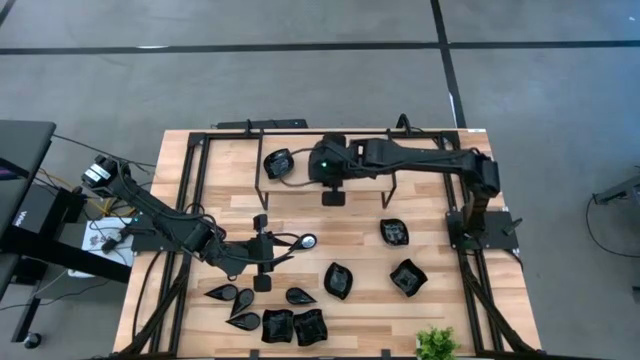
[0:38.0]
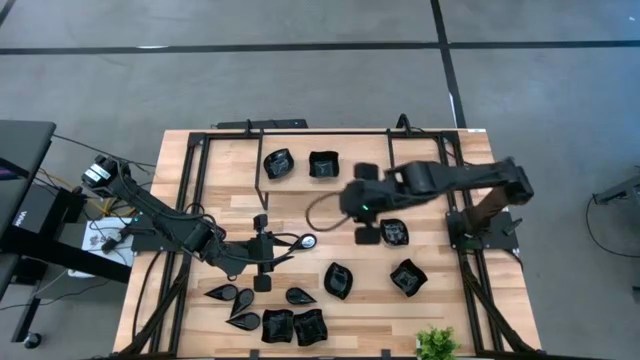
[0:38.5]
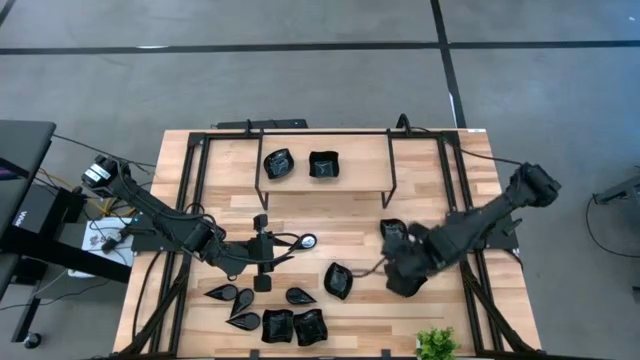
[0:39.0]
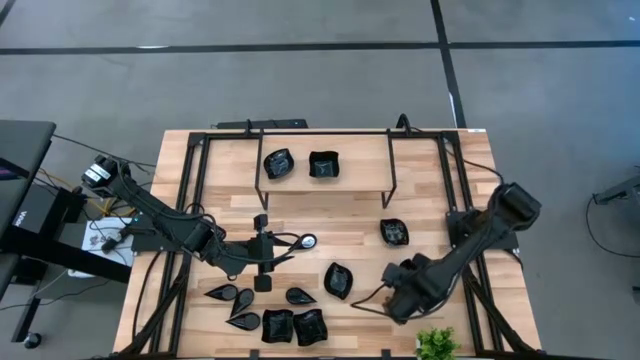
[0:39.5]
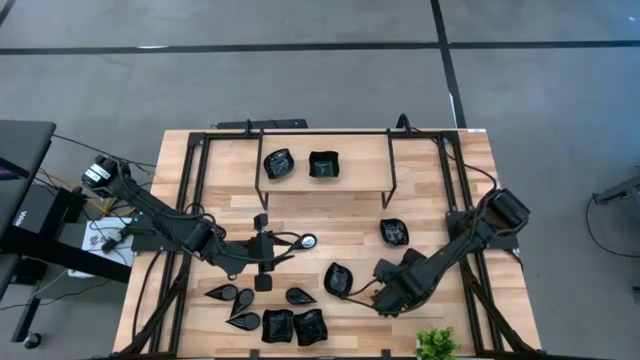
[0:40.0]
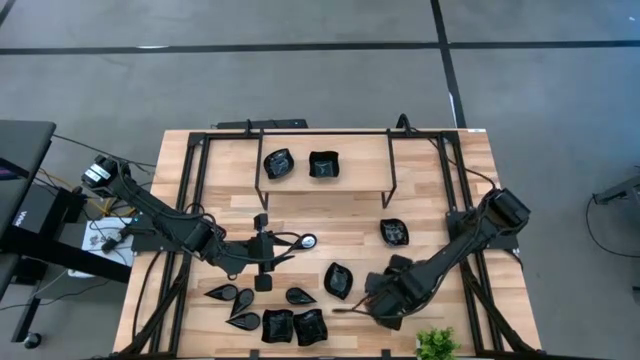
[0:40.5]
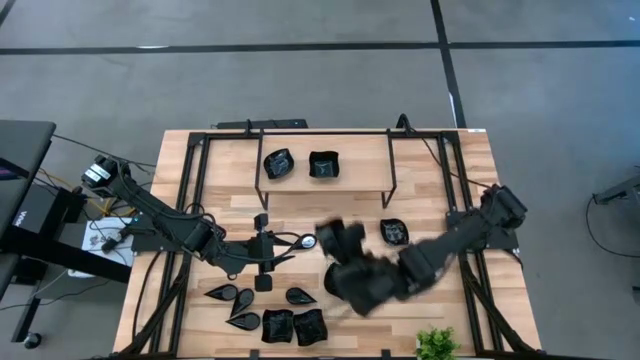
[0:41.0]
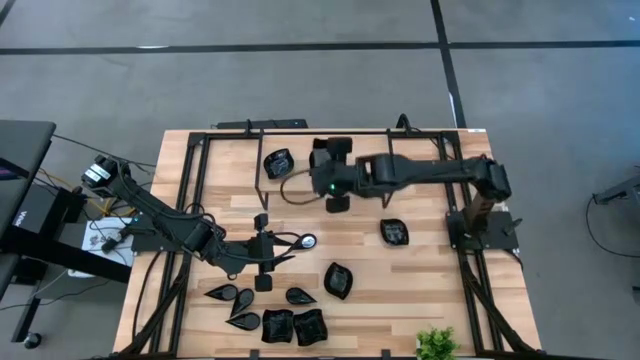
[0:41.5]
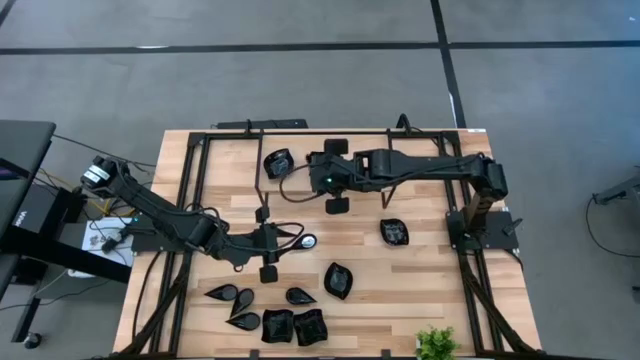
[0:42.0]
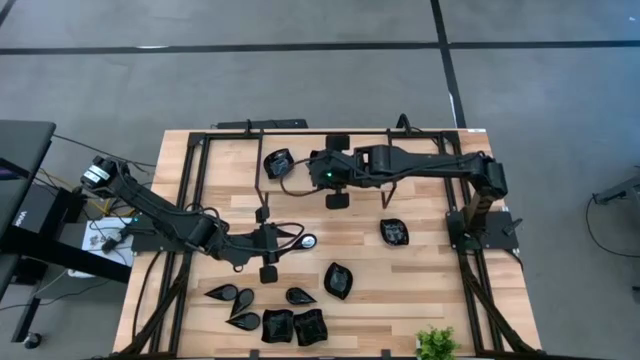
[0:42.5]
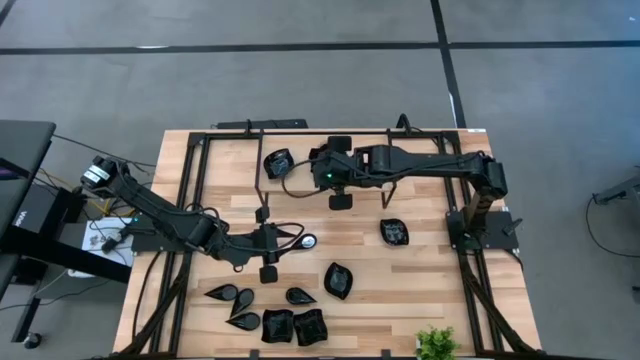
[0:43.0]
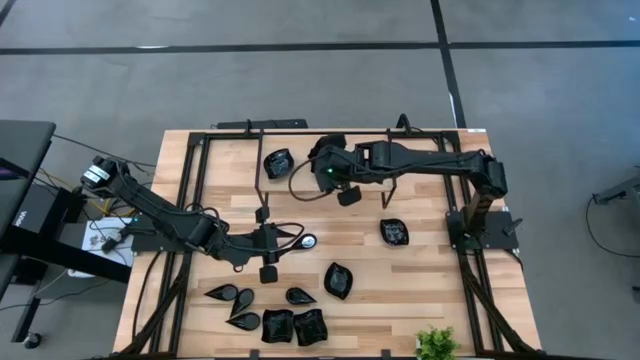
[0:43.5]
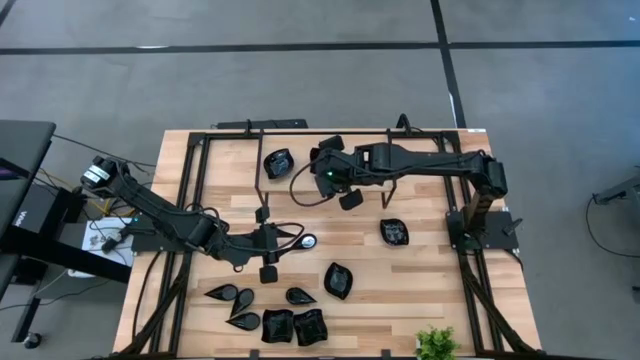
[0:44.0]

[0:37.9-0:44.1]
Task: Pick & Place Mini shaped plates
Stack the black distorted square plate on top of the black distorted square plate on the shelf

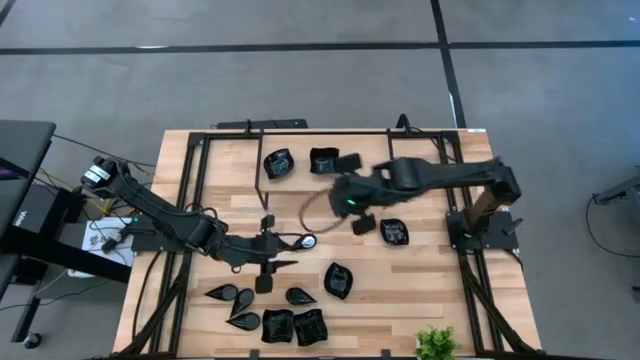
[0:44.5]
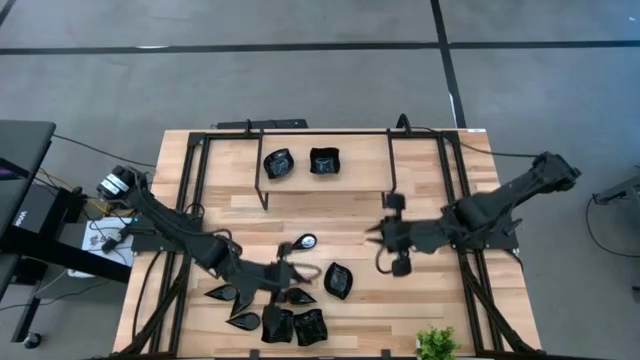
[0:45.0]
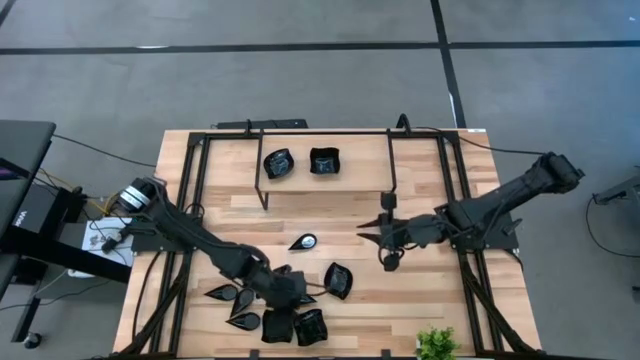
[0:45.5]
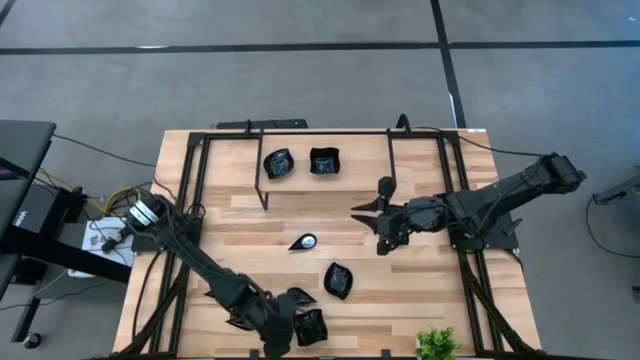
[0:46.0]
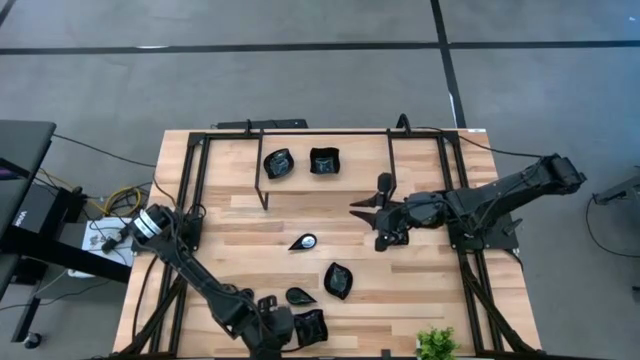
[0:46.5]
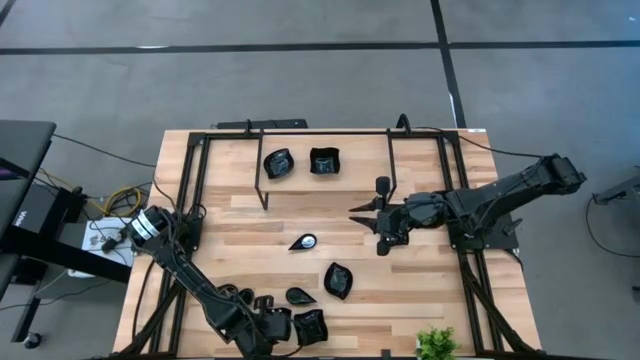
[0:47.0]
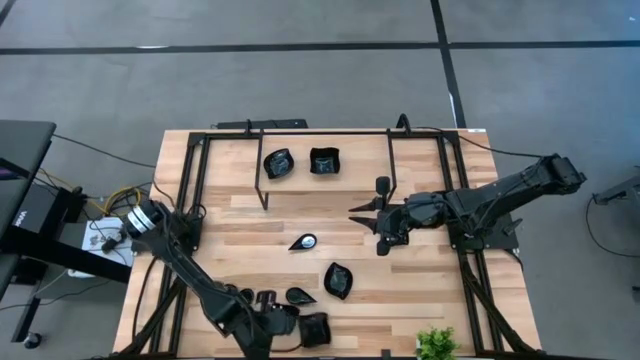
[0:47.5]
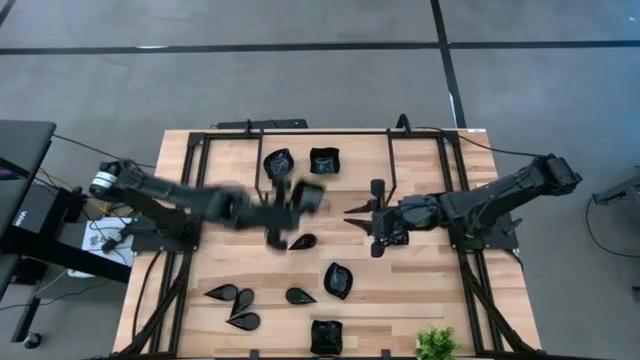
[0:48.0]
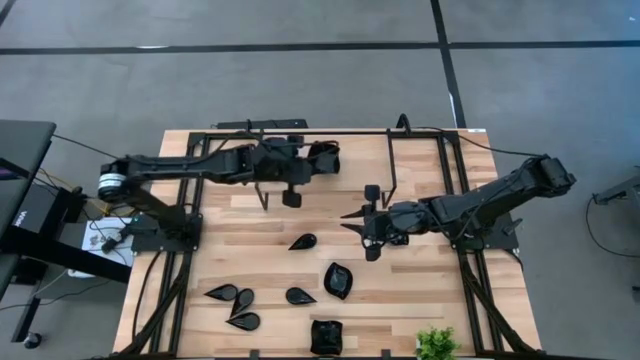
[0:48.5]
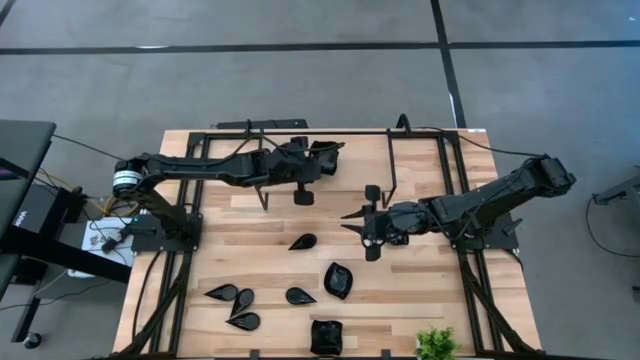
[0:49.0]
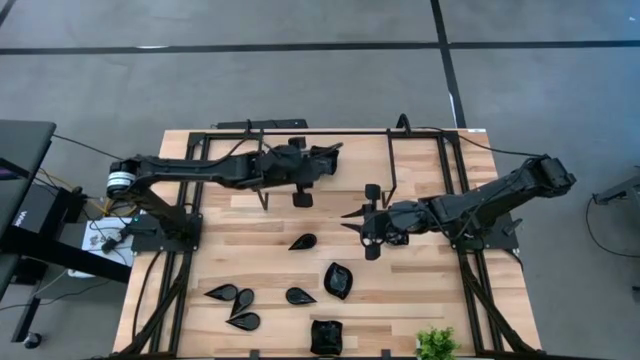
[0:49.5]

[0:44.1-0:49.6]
Stack the black distorted square plate on top of the black distorted square plate on the shelf

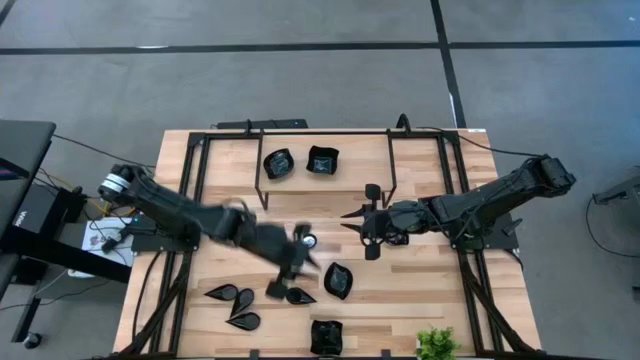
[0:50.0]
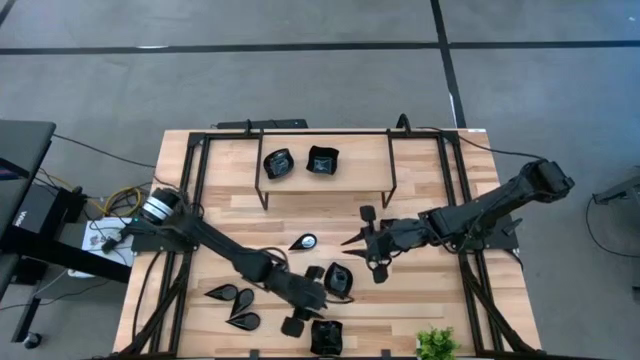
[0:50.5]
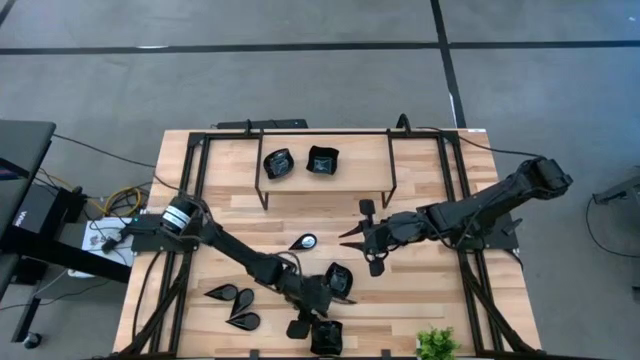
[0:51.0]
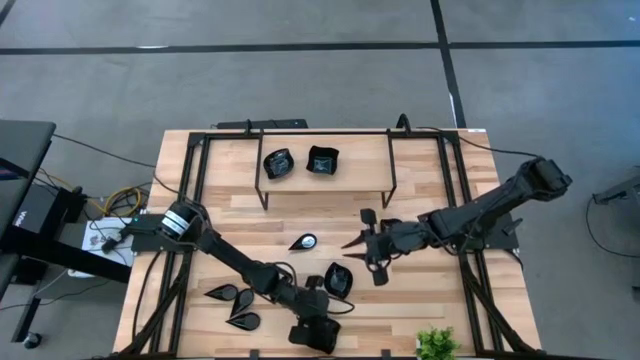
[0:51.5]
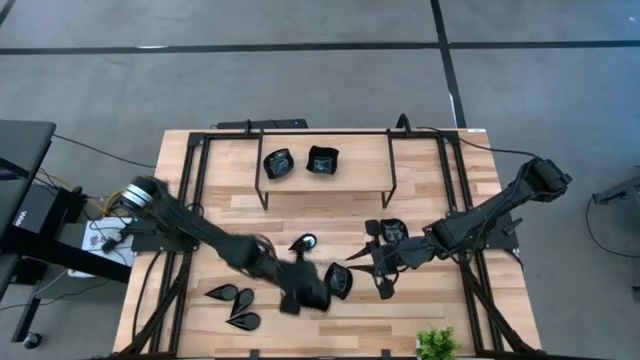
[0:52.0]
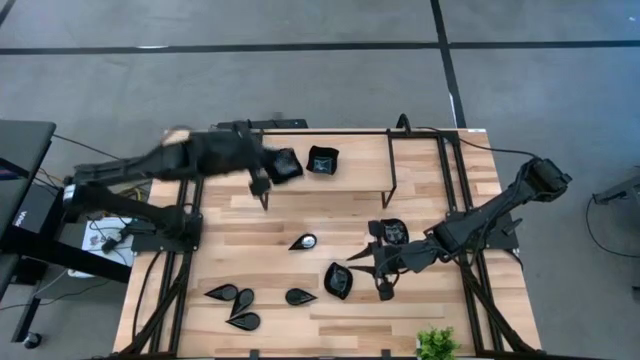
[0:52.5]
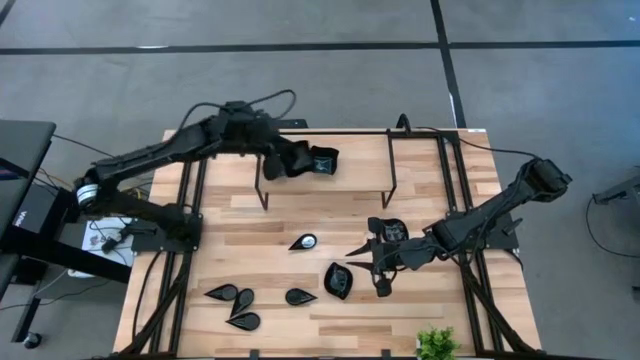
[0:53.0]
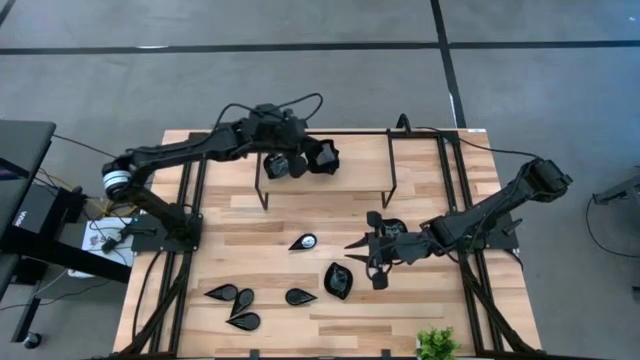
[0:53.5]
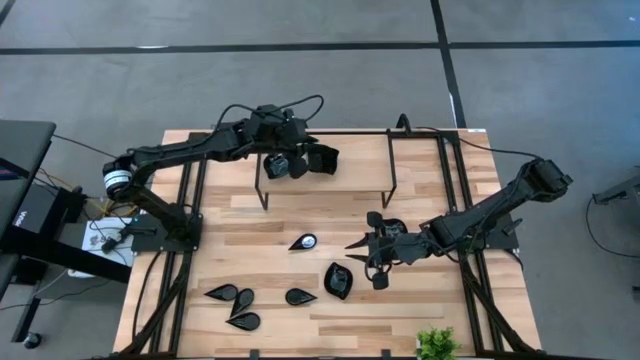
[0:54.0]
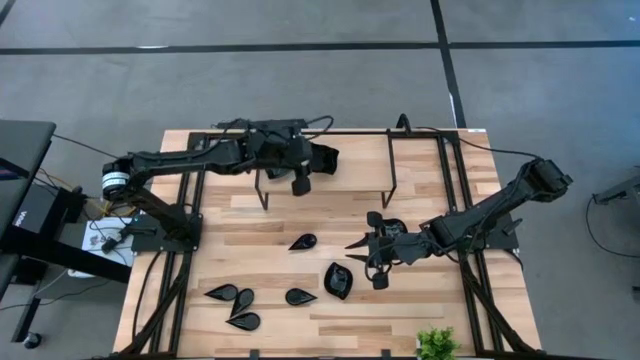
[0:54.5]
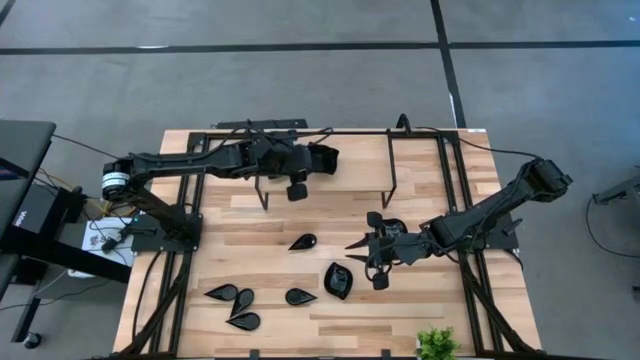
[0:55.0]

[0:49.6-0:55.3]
Stack the black distorted square plate on top of the black distorted square plate on the shelf

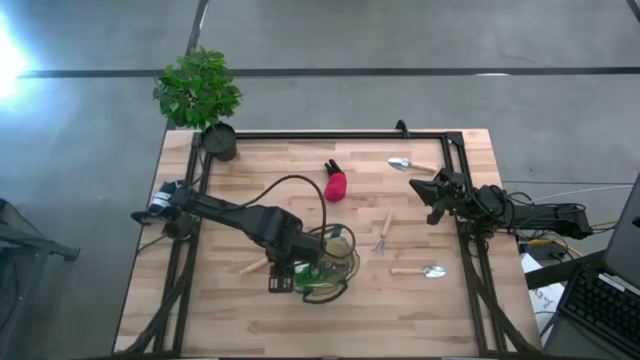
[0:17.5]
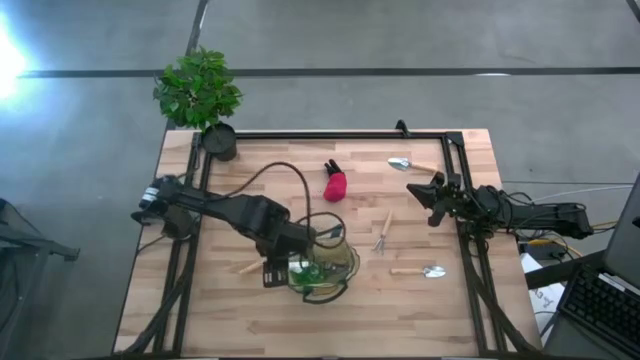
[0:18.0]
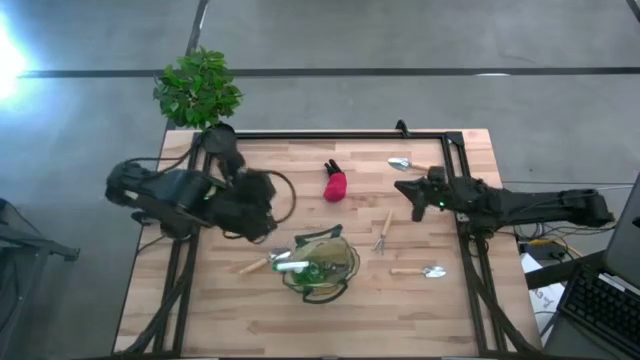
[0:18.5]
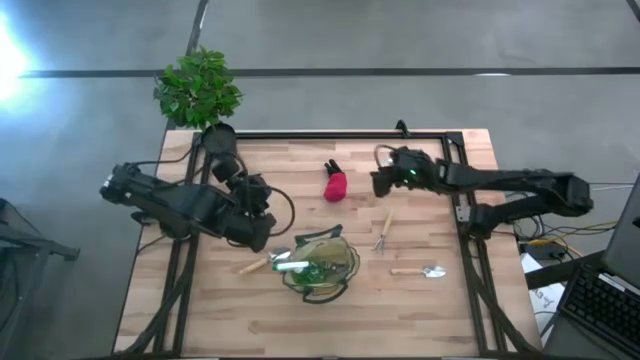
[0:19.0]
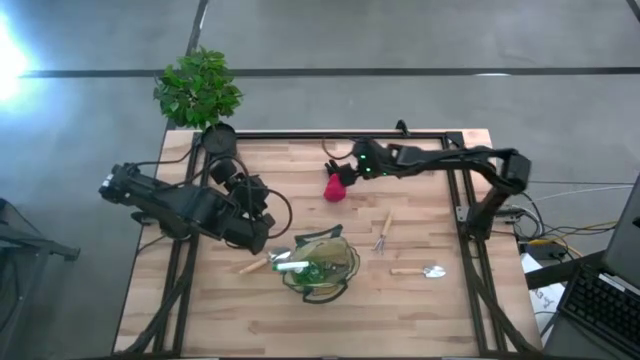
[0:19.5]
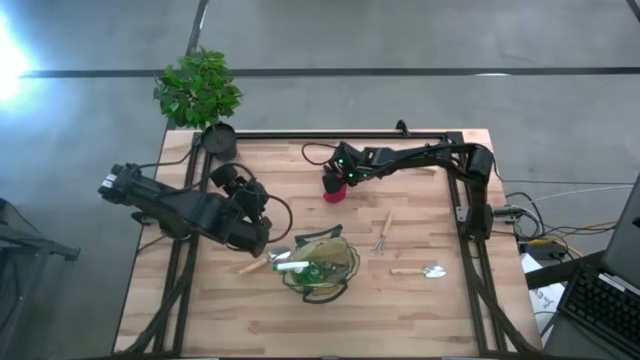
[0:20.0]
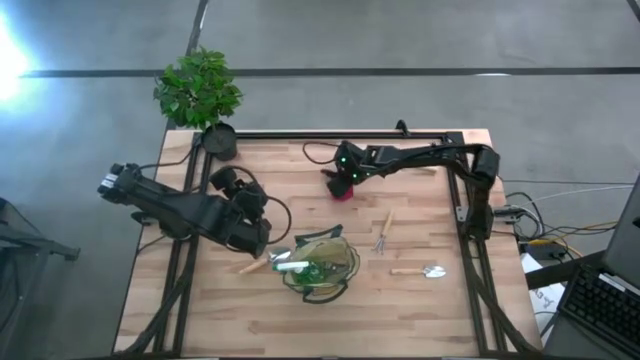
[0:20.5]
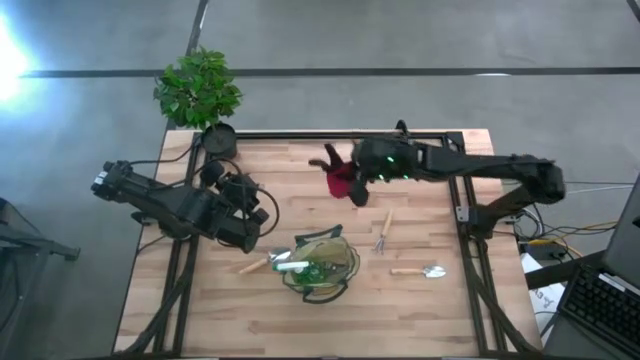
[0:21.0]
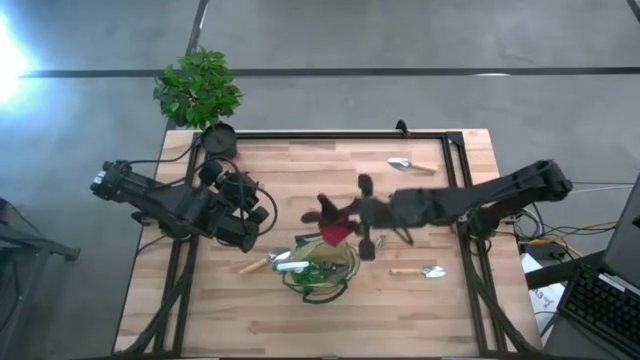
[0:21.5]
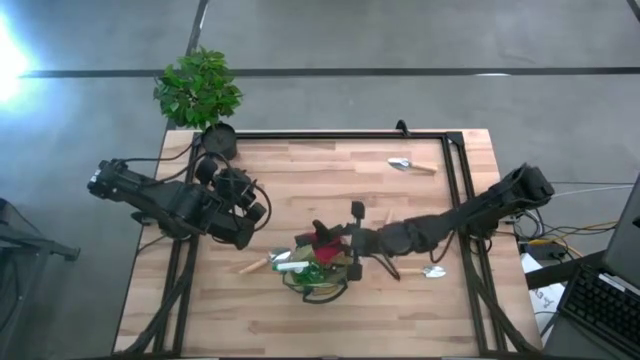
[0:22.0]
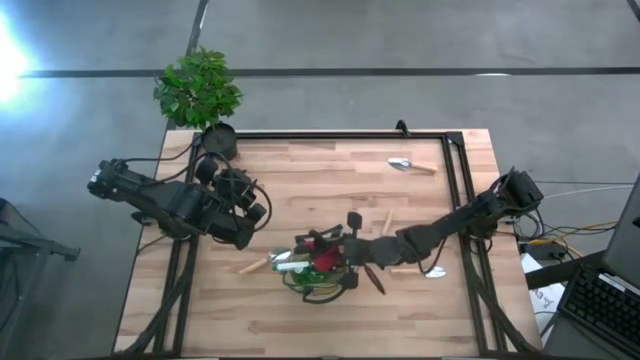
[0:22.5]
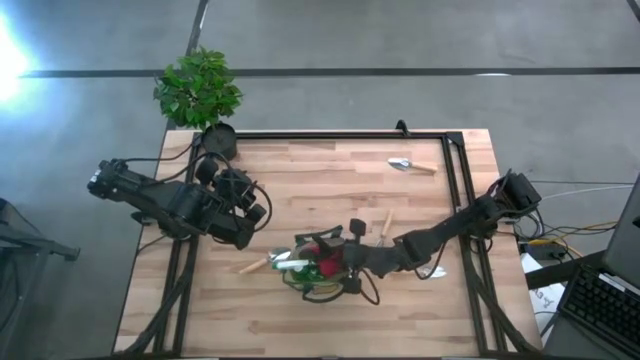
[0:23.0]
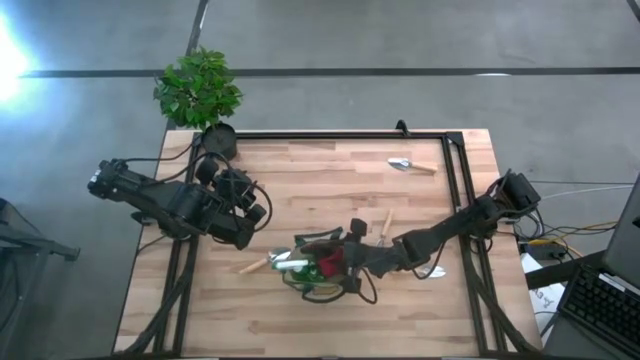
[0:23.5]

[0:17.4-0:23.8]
Task: Pick & Place Garden tools in Gardening bag
Put the gloves into the gardening bag
